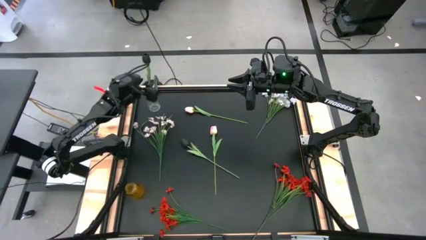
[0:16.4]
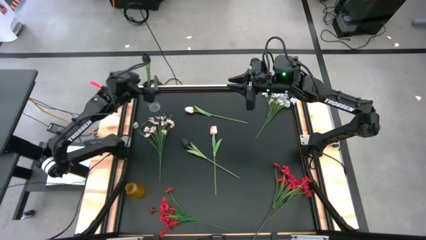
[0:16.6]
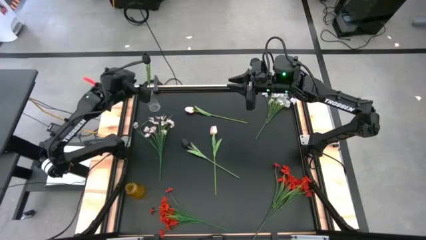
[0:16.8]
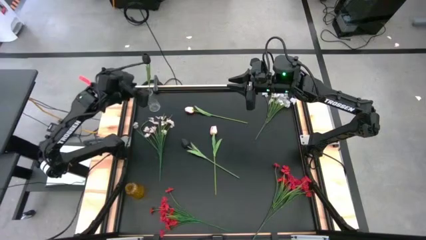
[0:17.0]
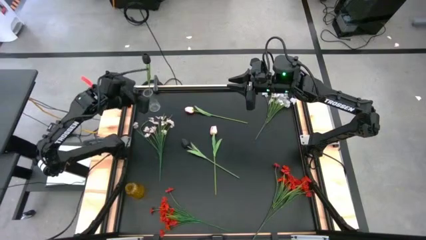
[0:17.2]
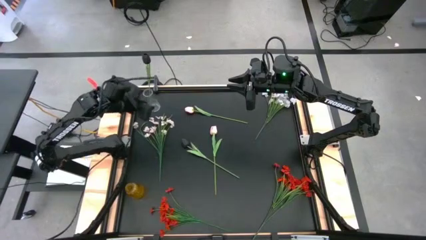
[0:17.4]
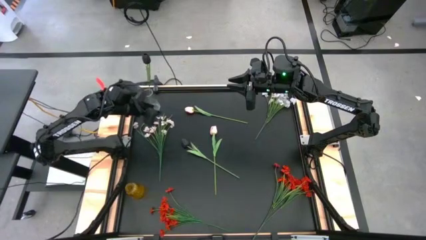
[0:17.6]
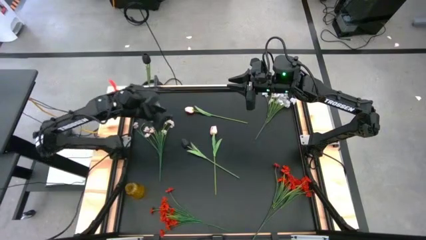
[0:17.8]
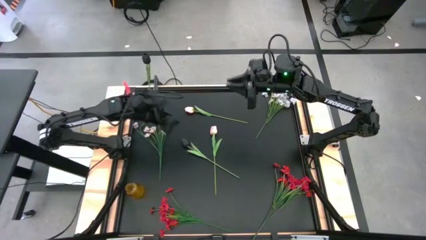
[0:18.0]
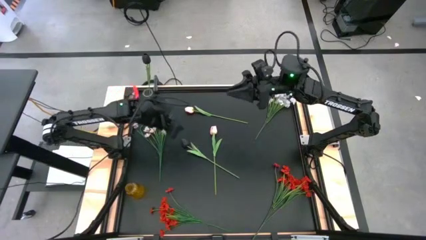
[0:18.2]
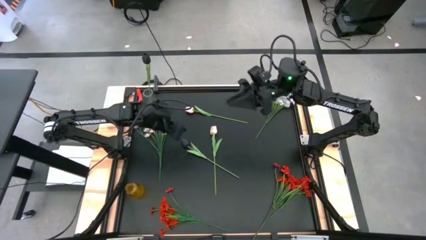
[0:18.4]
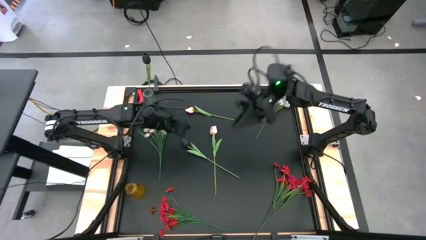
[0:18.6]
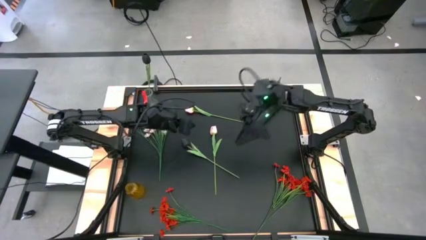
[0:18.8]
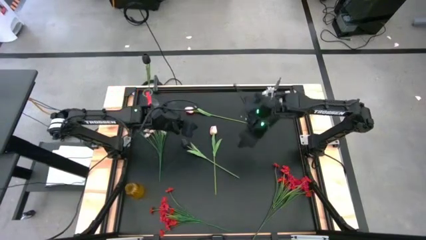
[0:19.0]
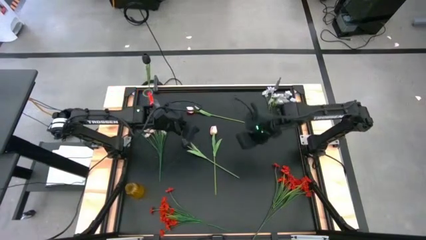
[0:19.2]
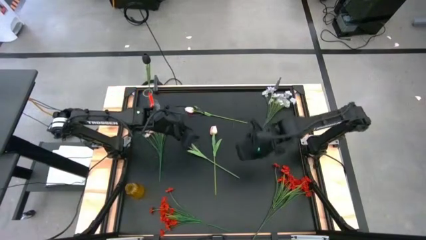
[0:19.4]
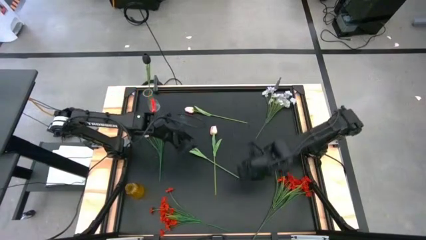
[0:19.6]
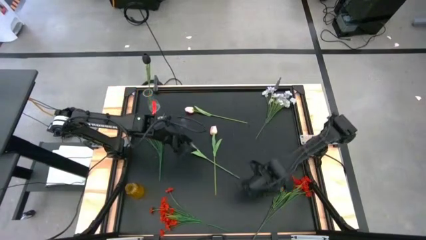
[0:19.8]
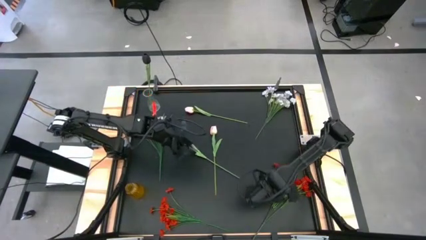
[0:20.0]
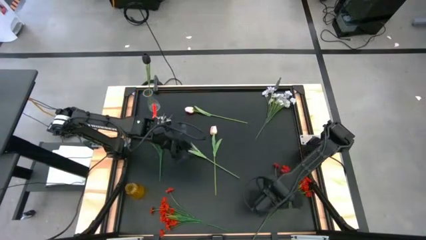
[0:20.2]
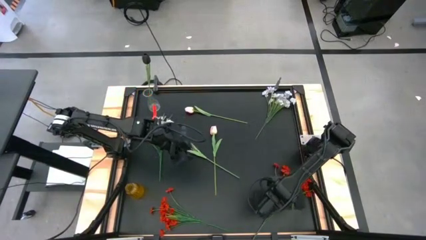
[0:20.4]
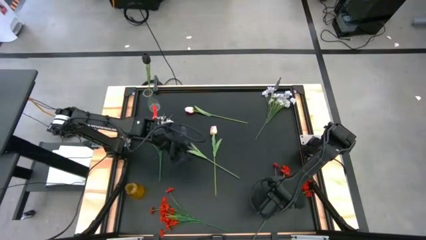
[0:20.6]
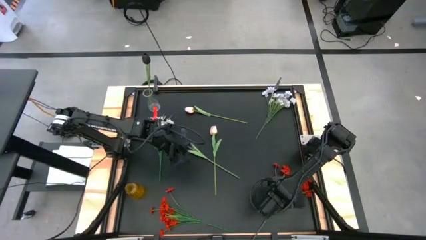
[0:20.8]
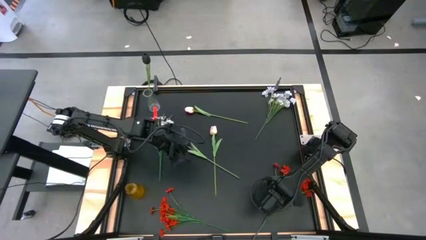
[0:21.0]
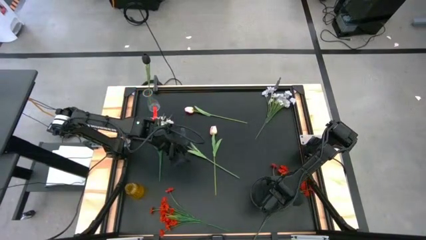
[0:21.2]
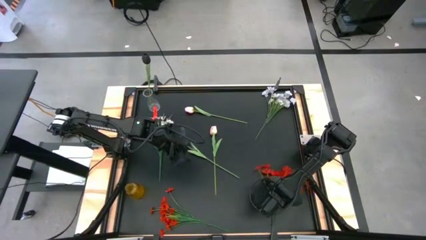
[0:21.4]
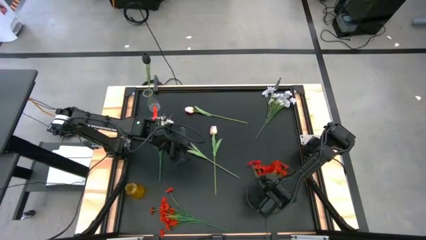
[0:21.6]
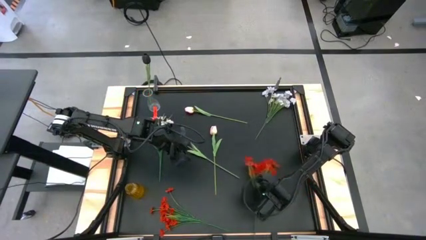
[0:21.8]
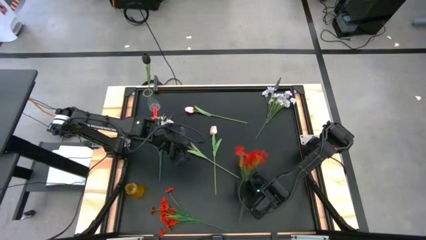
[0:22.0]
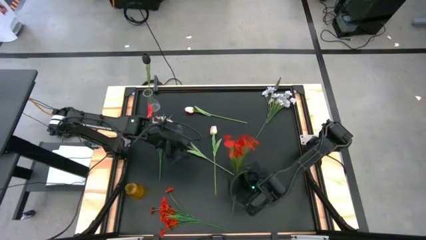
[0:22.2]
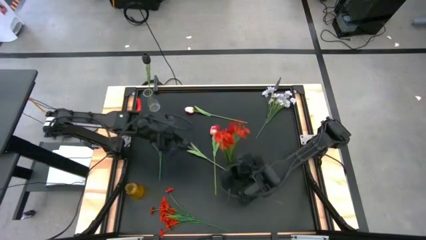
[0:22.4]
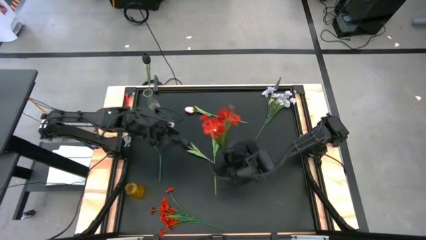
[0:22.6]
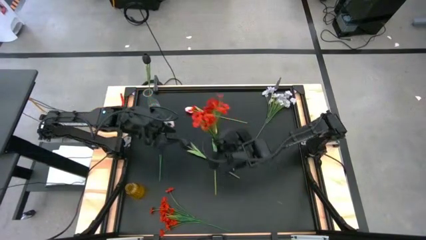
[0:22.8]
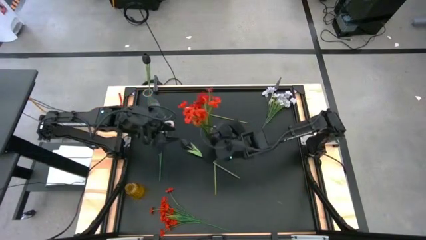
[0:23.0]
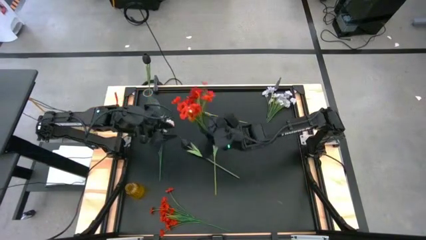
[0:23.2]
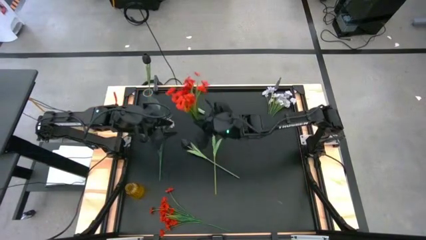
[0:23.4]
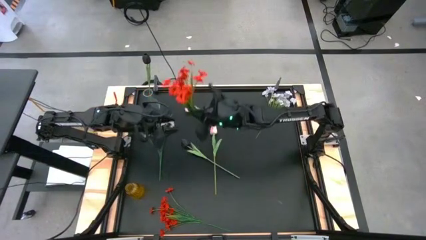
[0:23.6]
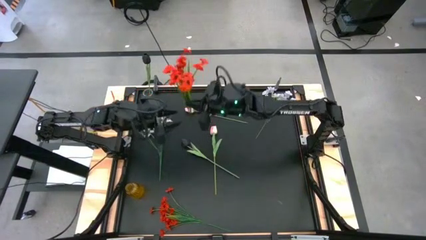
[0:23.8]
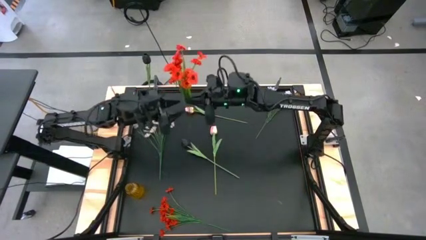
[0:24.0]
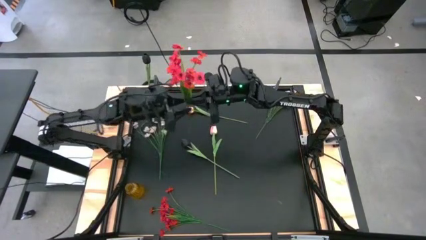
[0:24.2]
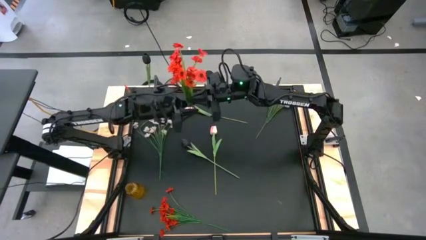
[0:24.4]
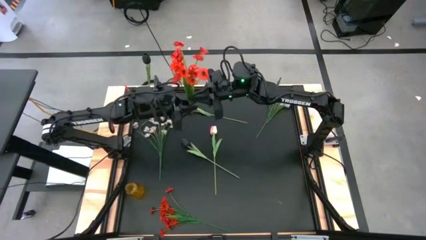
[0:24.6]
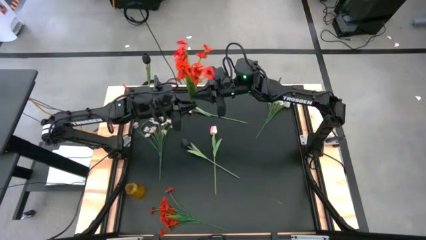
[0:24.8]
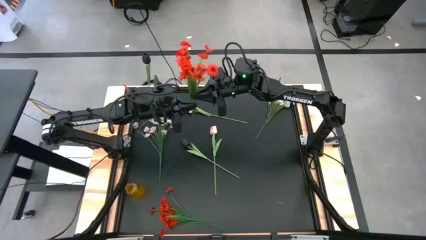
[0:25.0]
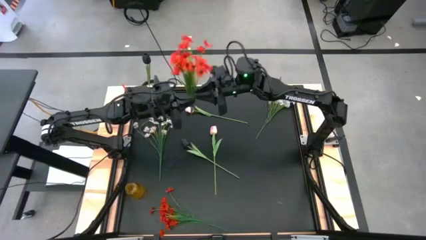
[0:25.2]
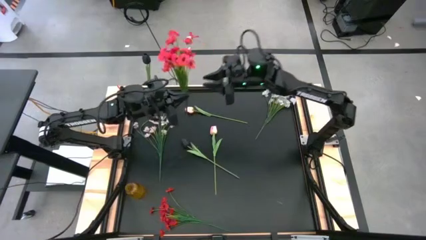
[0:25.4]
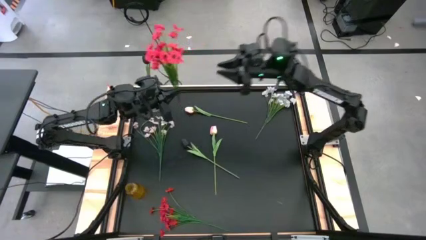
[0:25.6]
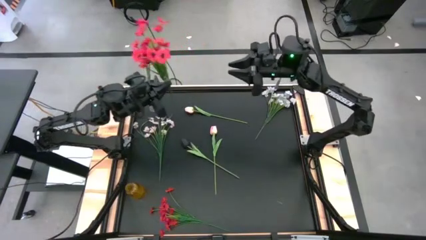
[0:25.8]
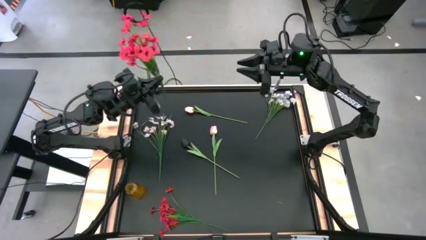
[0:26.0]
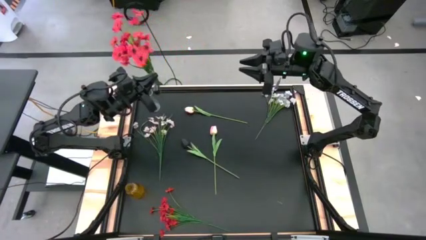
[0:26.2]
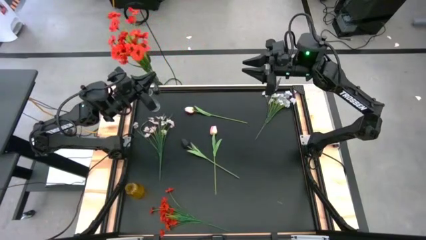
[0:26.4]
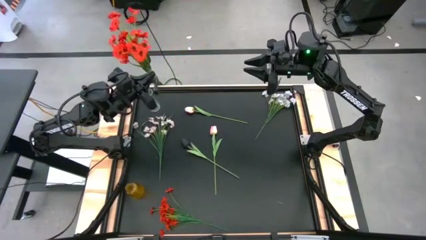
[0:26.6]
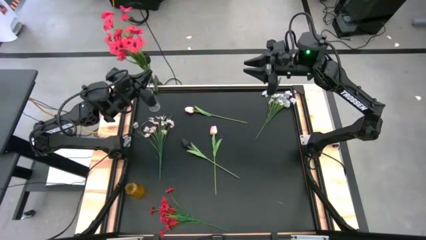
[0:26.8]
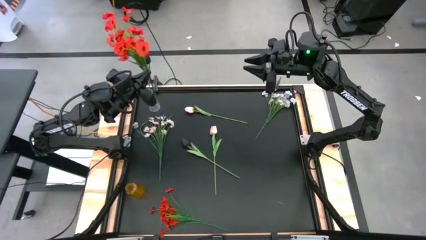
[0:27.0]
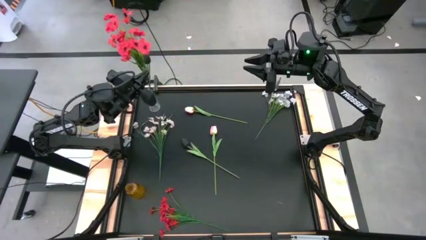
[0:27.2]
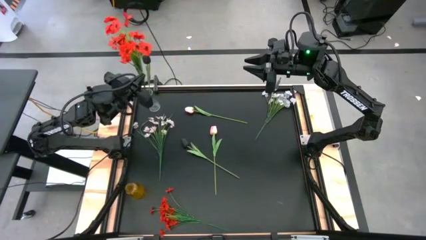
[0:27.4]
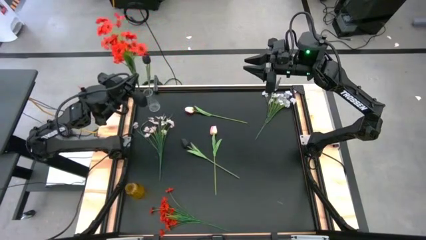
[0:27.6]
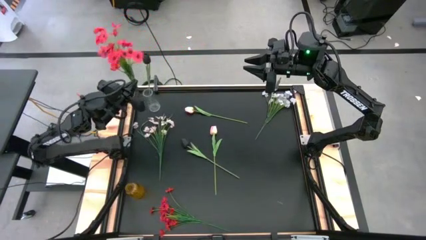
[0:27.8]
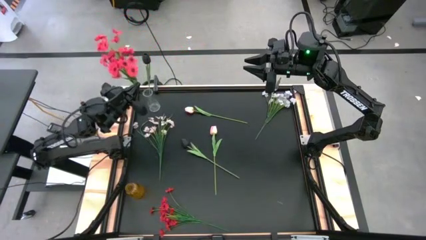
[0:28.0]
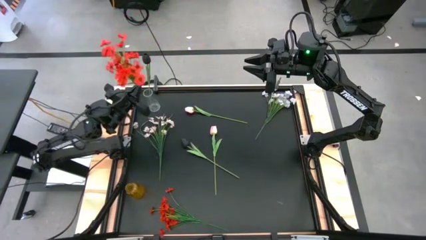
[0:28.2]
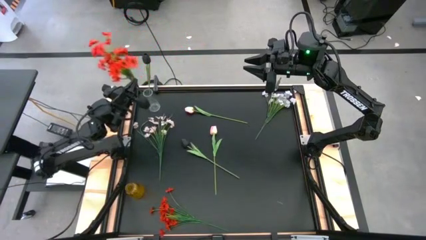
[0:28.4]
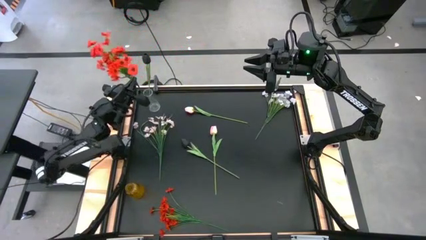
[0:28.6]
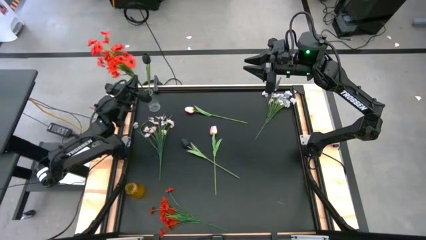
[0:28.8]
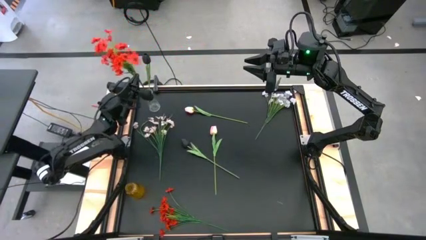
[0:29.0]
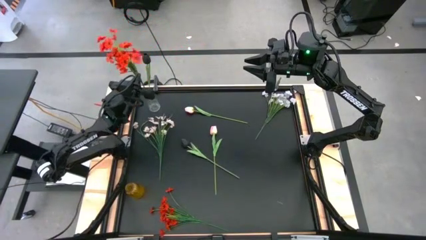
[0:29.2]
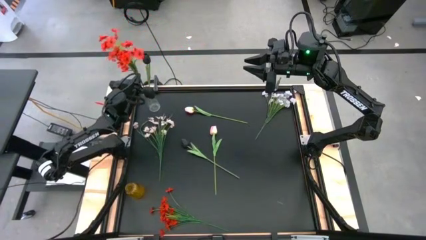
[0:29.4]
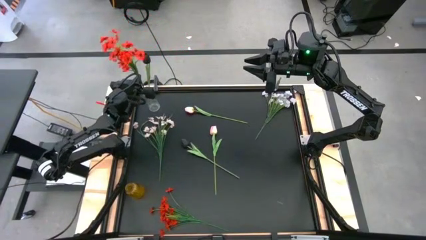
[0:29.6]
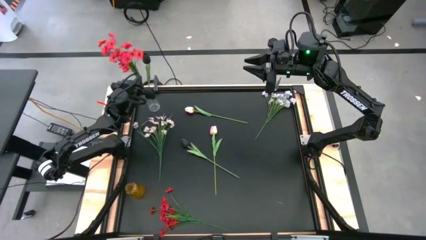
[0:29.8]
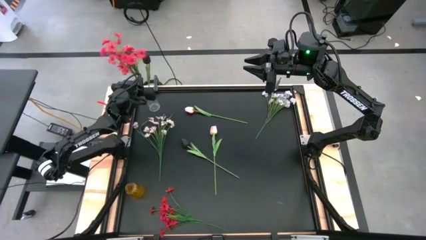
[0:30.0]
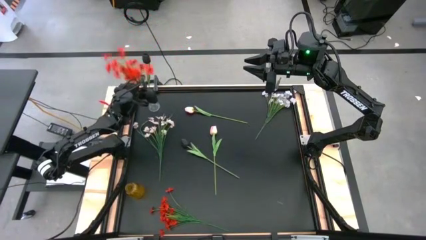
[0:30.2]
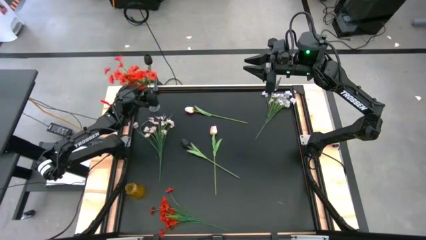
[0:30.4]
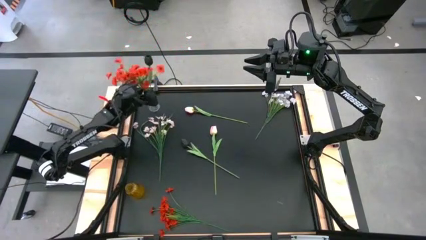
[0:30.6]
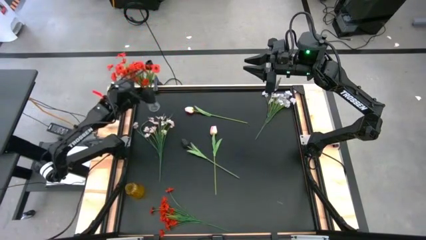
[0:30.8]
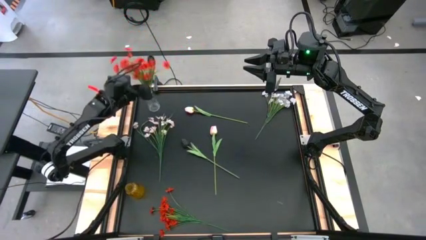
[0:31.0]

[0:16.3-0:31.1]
Task: Sort flowers into vase by color
Put the red flowers into the transparent vase

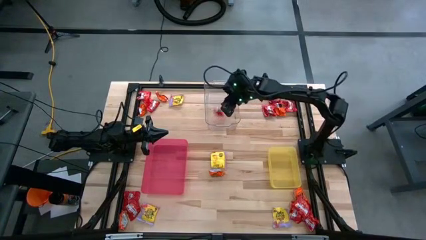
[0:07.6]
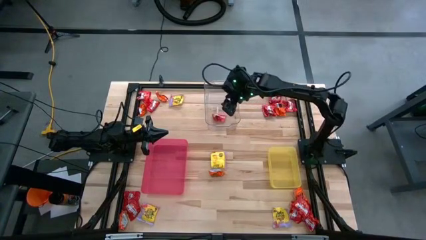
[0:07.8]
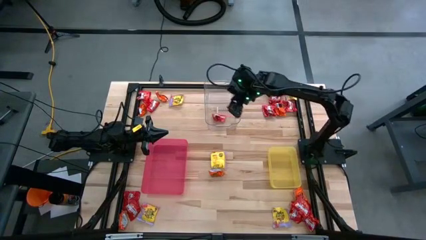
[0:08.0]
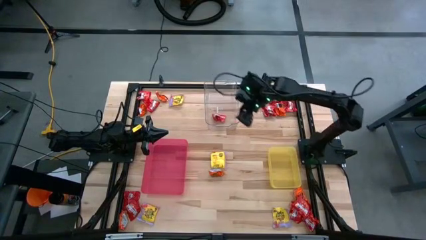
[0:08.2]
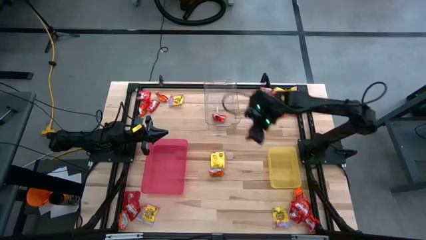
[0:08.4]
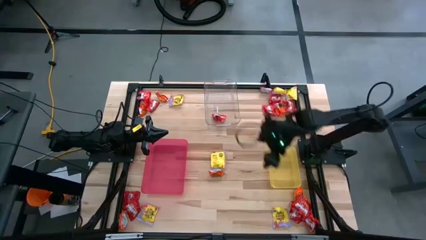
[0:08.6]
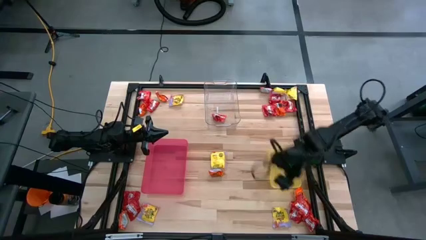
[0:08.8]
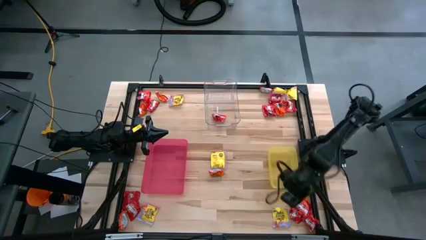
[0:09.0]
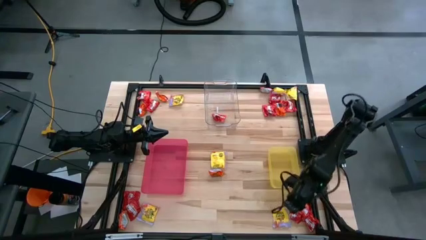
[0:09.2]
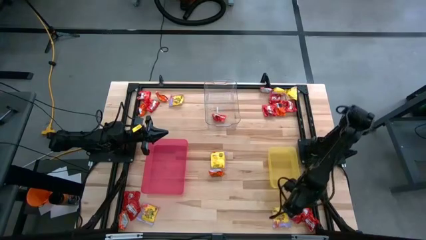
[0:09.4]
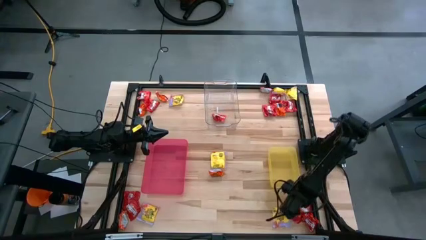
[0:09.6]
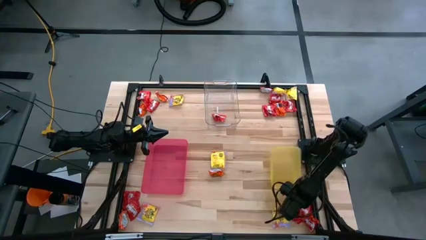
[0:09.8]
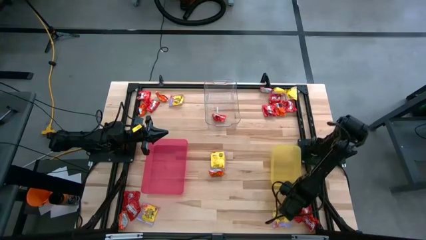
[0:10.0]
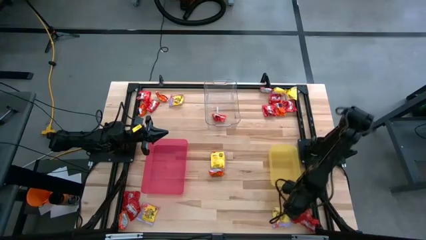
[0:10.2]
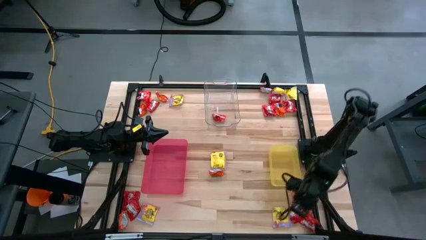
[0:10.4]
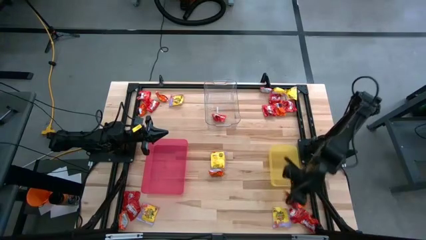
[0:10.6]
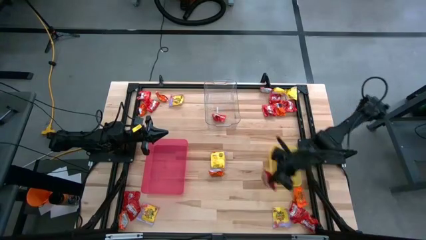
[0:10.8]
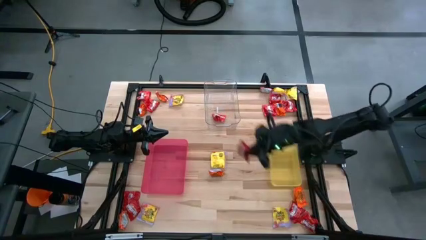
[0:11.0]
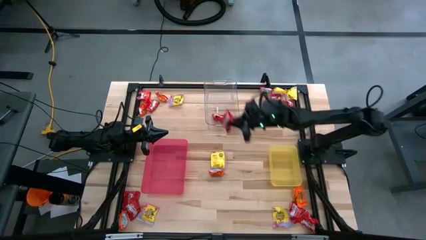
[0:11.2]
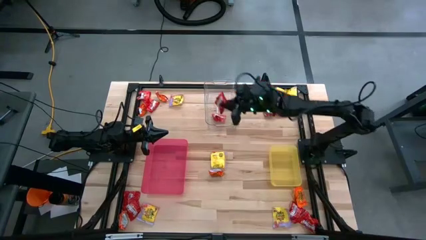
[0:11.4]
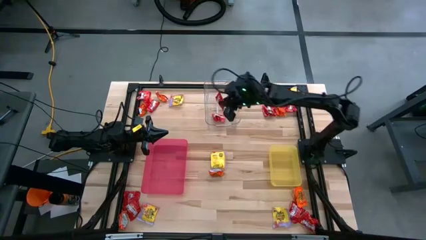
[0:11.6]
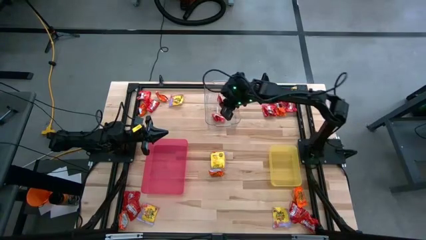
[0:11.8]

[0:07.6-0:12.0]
Task: Sort candy
Put the red candy into the transparent bin
